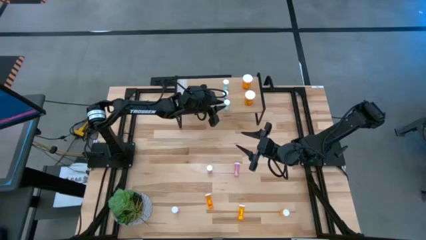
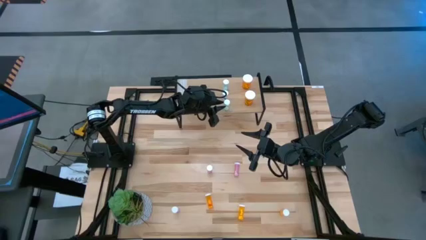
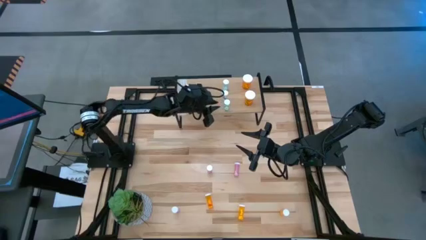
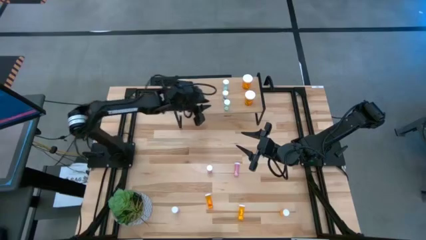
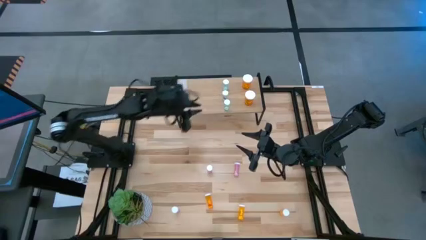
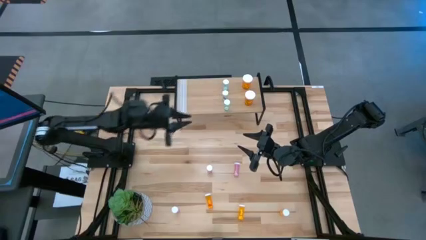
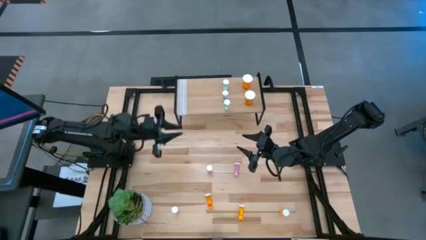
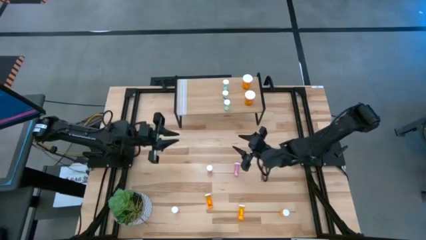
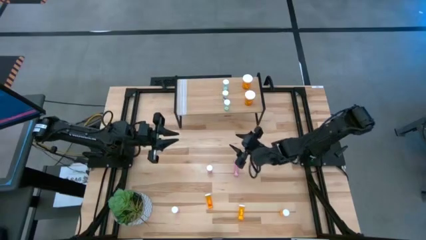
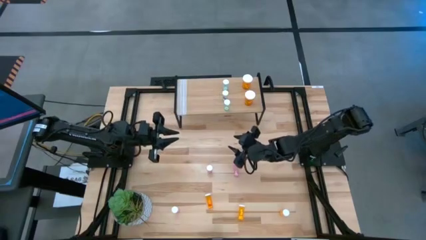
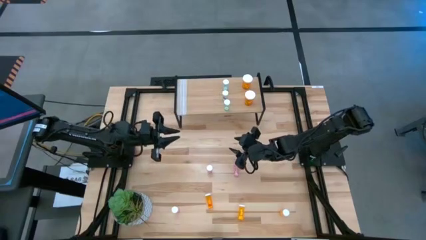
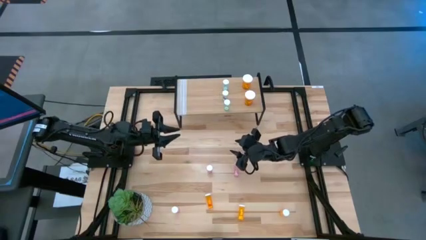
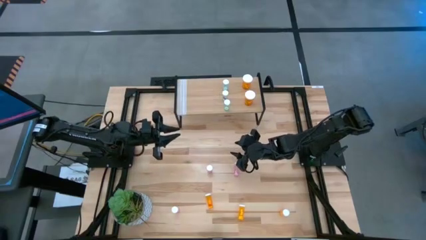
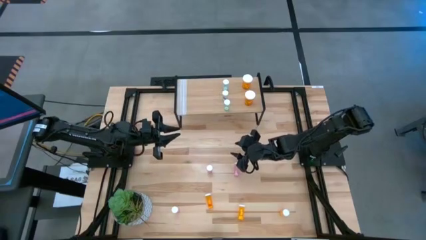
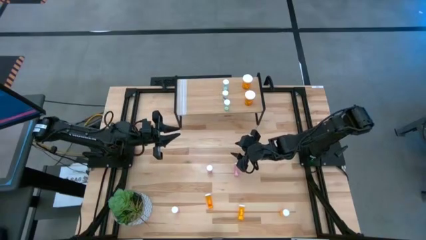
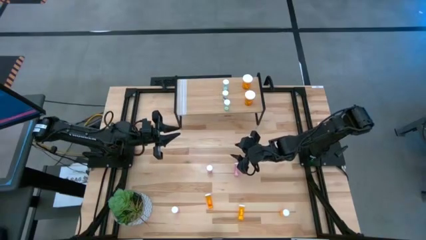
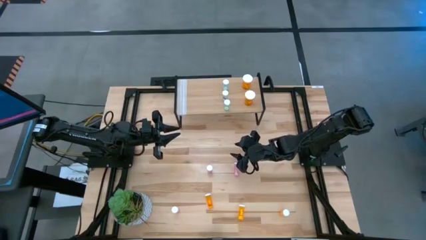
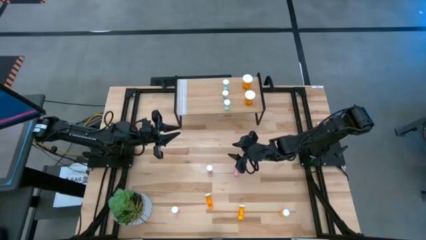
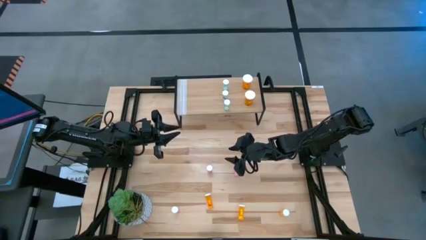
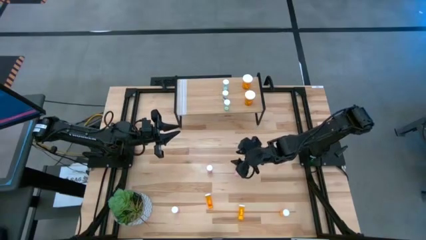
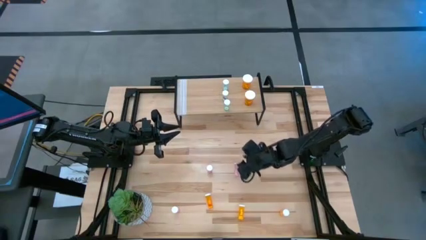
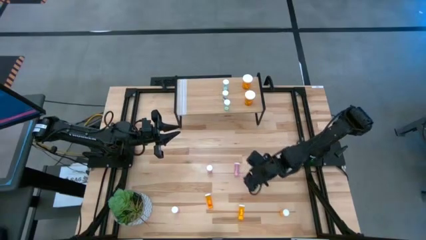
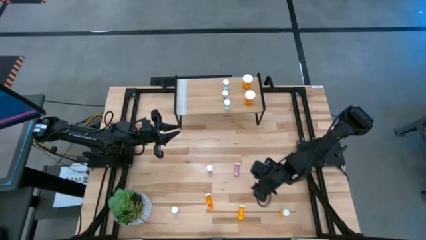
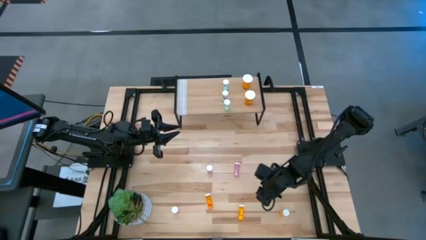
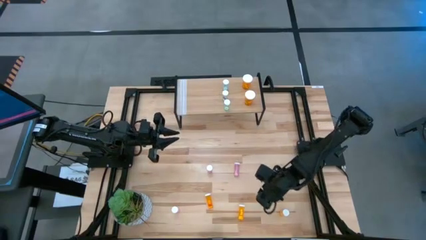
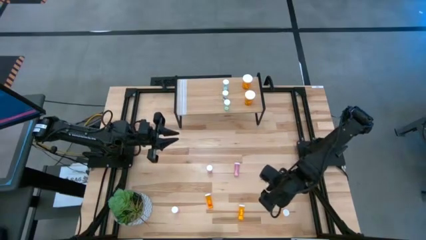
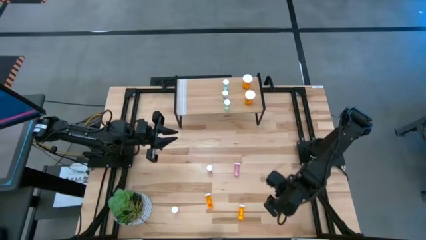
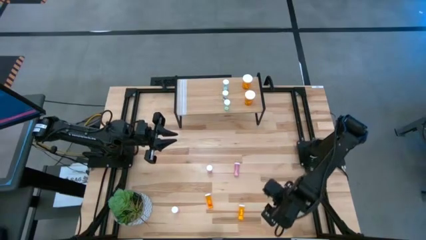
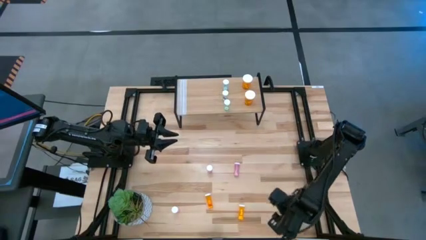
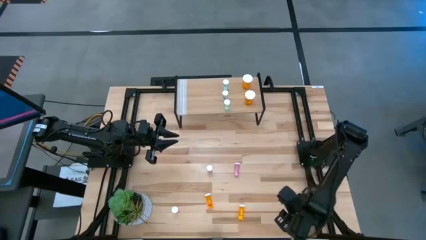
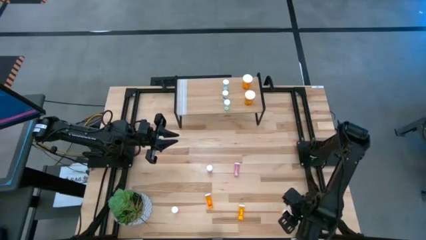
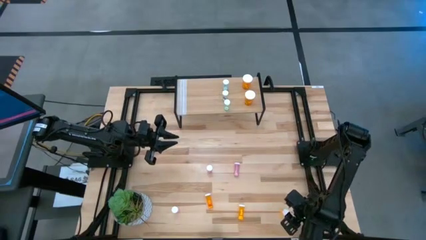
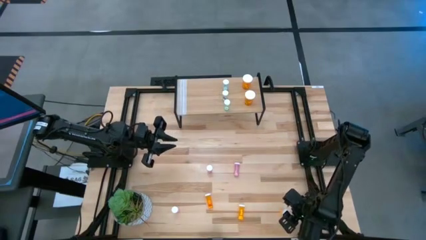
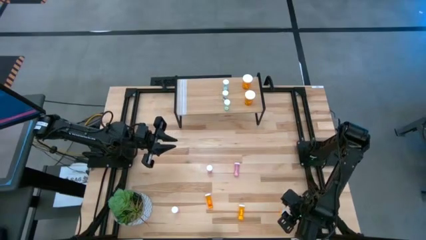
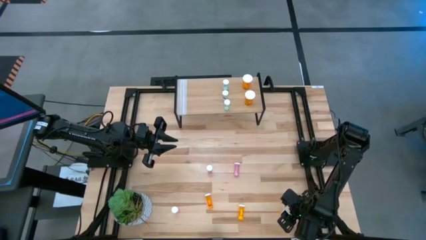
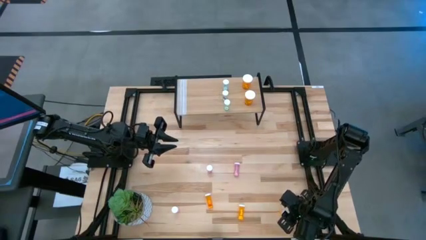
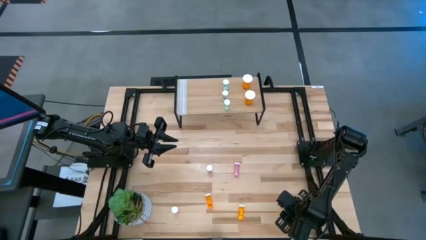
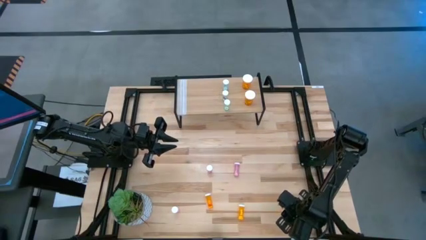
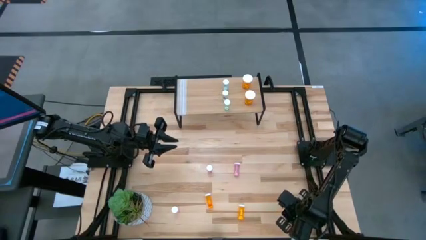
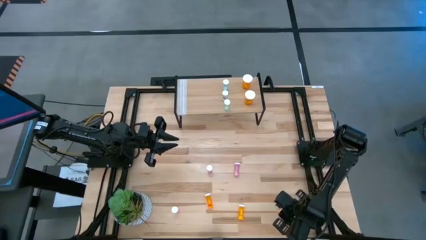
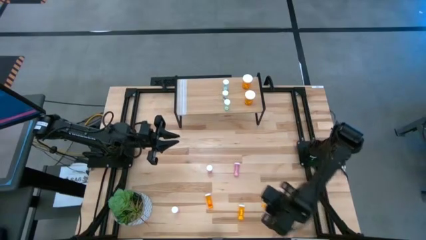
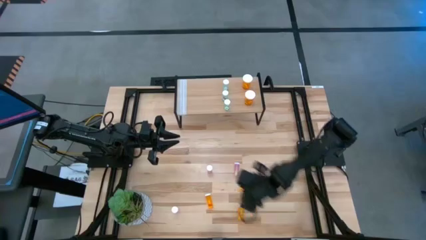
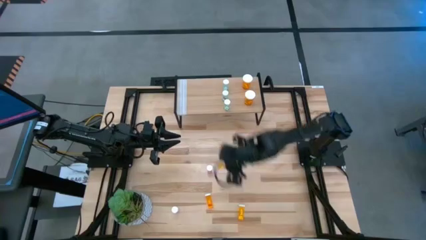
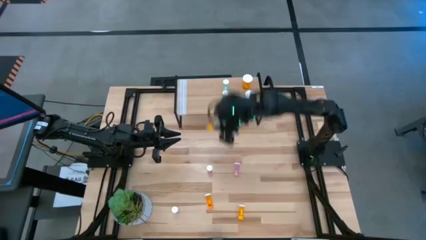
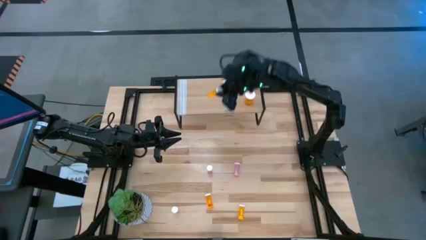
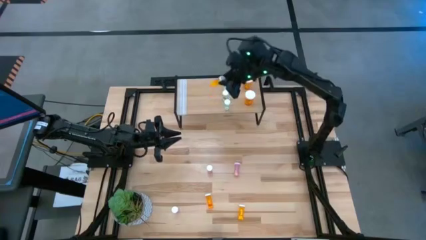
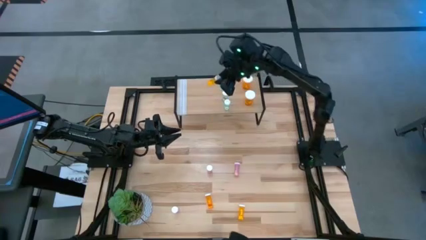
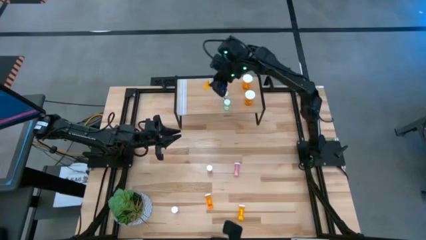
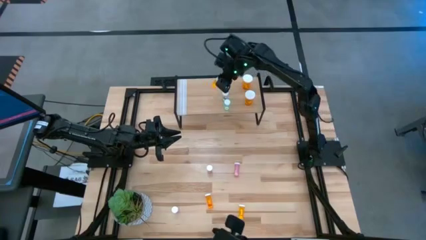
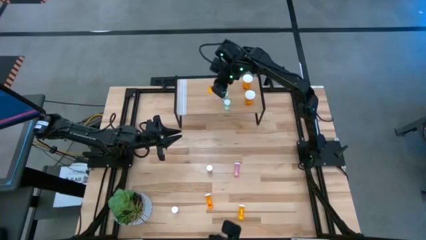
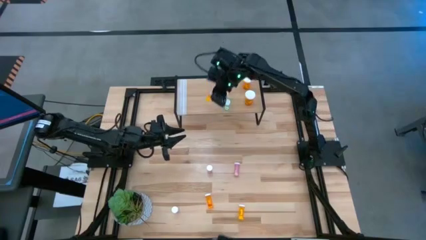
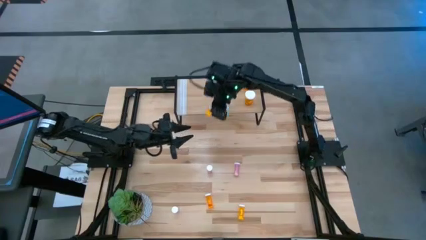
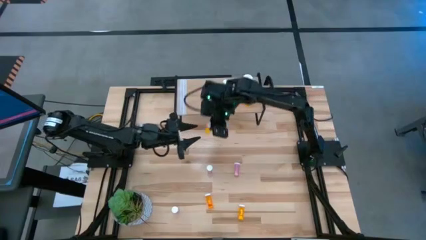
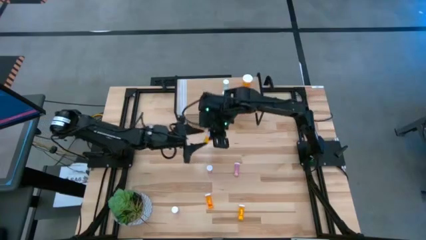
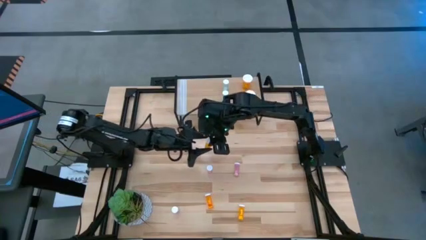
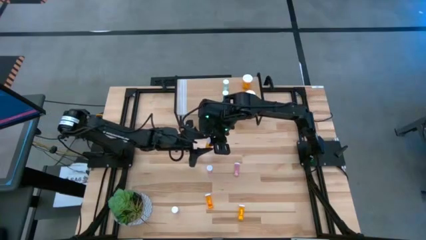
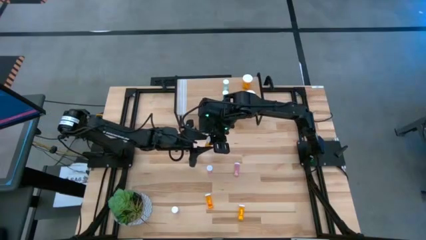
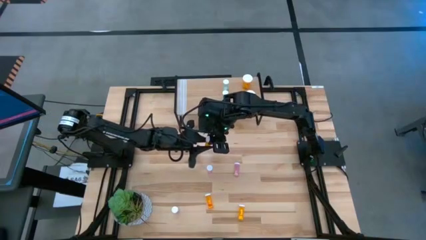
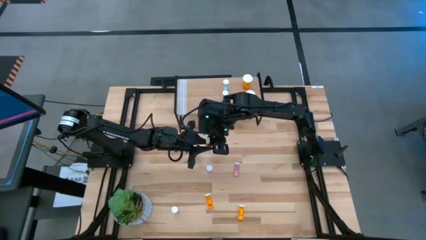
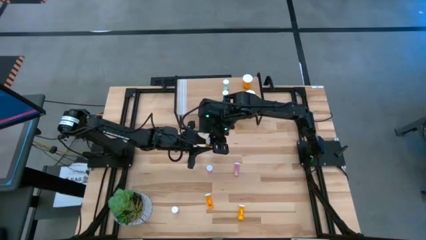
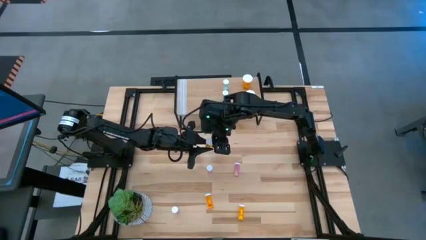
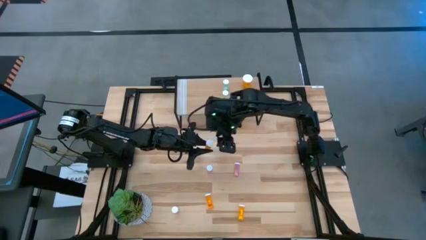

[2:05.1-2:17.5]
Task: Pick and place medicine bottles onto shelf by color
Put the bottom right small orange pill bottle on the shelf

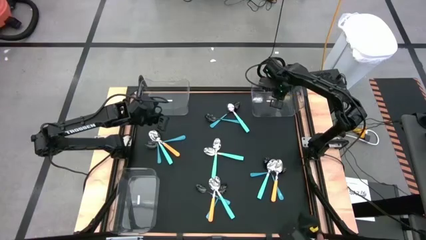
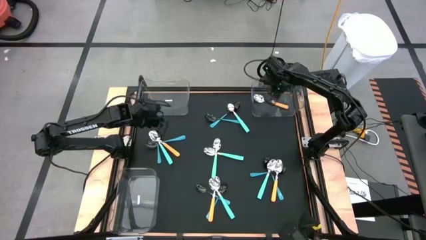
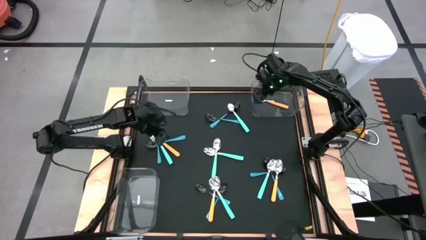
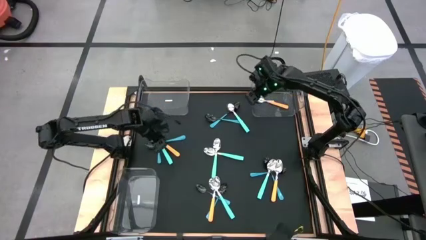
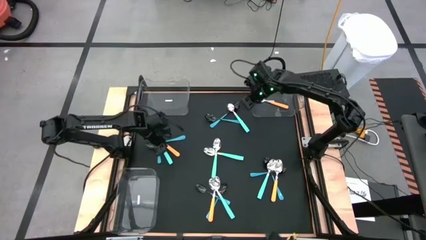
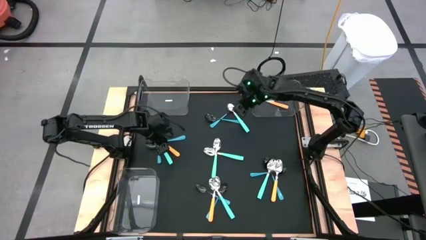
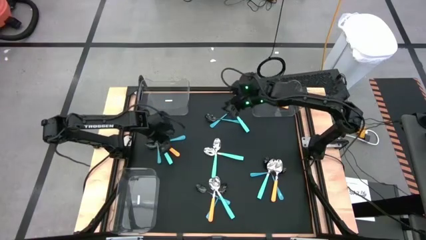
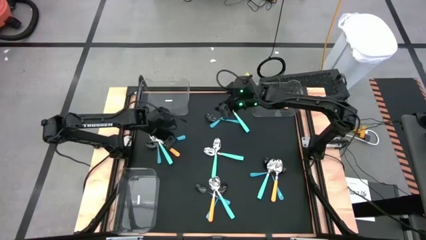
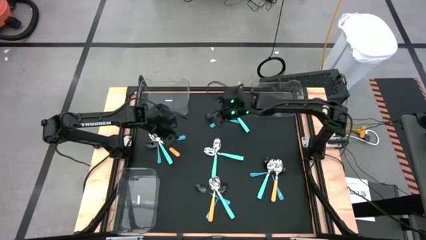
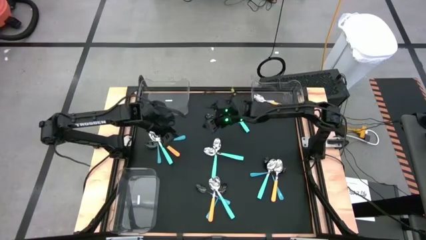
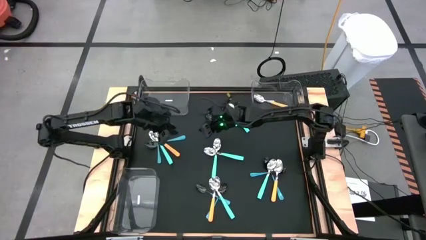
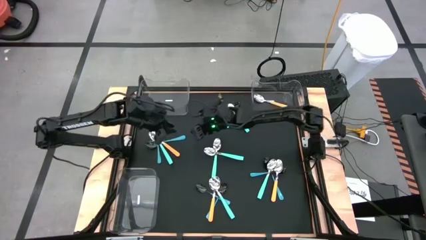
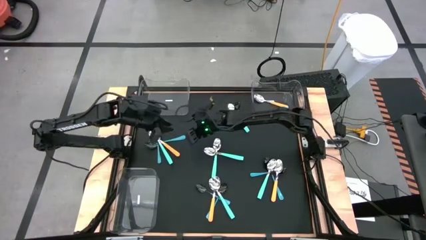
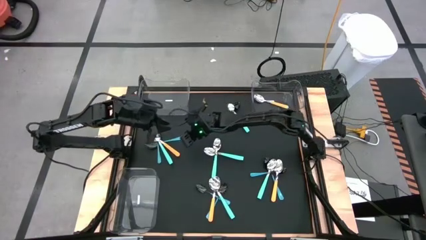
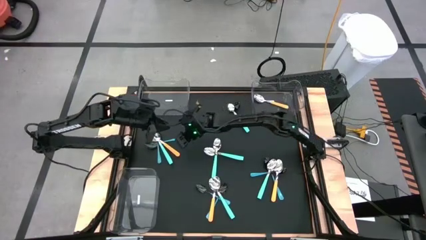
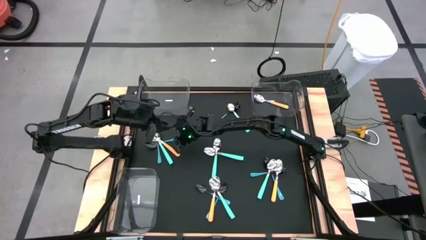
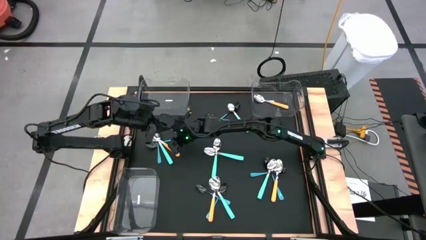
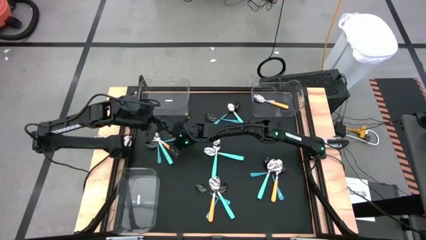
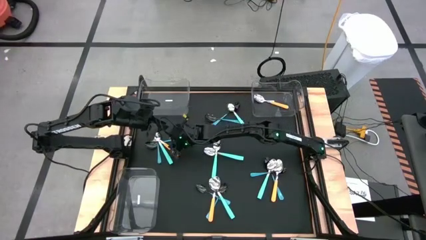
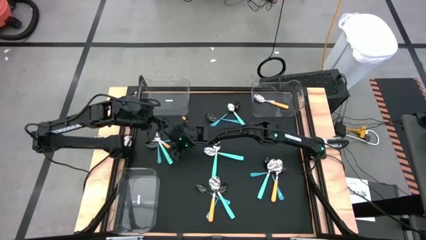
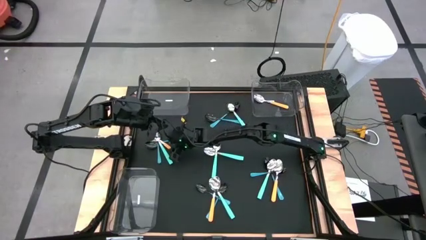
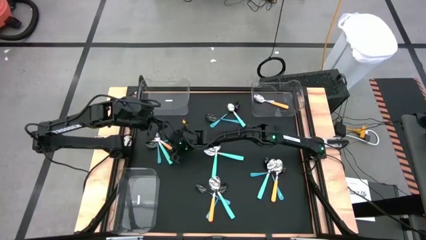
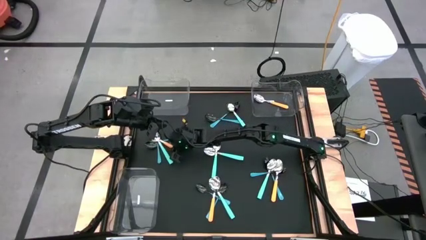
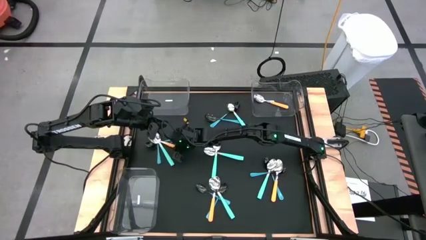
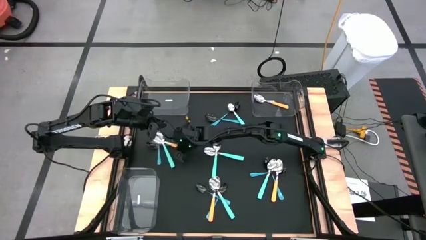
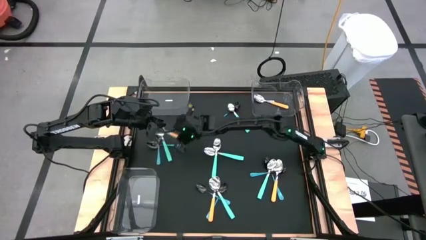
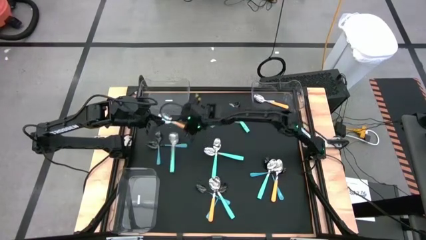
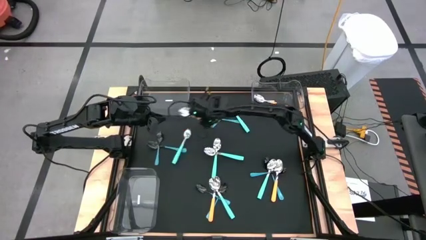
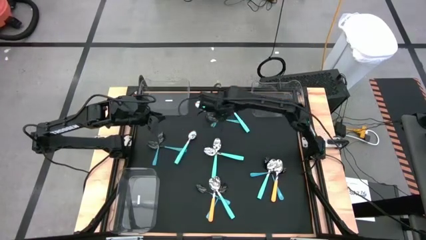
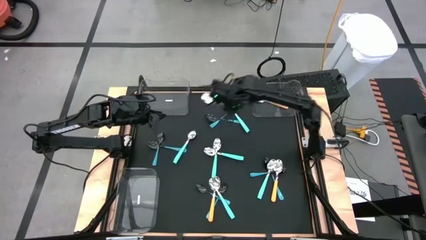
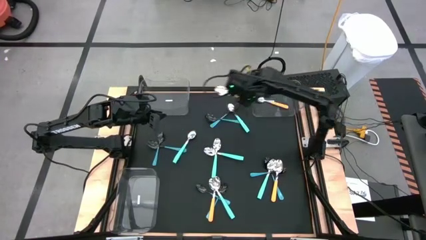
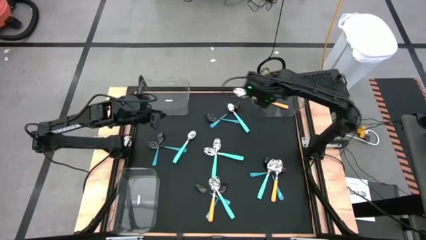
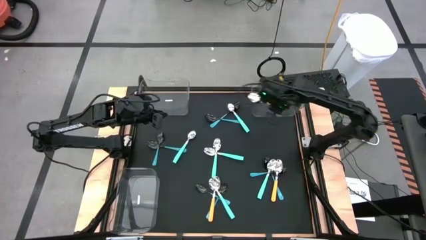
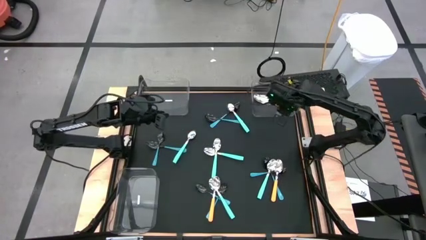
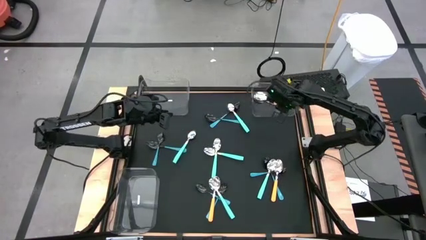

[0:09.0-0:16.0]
Task: Sort silverware by color (type)
Put the yellow spoon into the top right transparent bin
